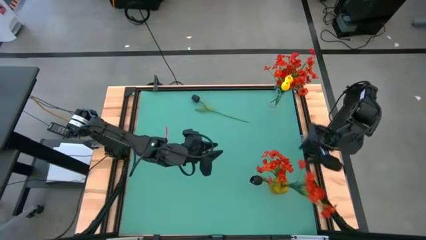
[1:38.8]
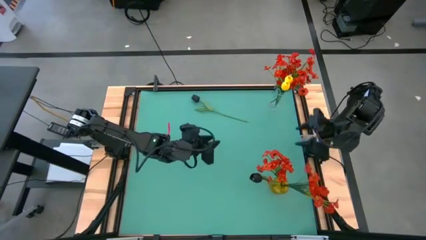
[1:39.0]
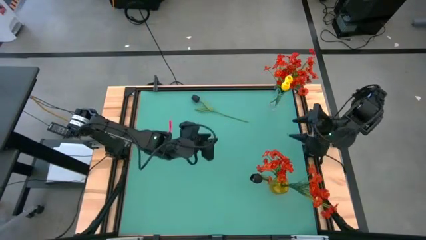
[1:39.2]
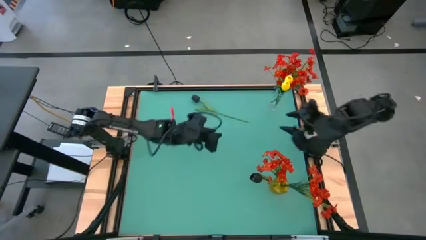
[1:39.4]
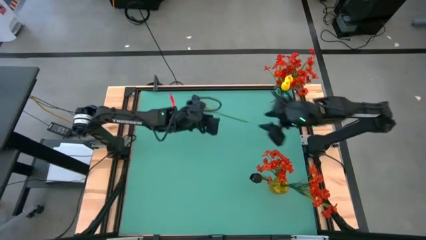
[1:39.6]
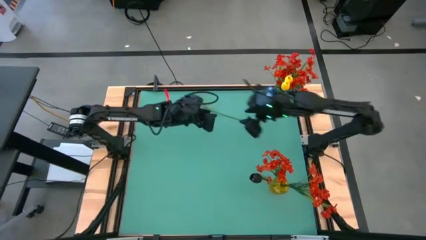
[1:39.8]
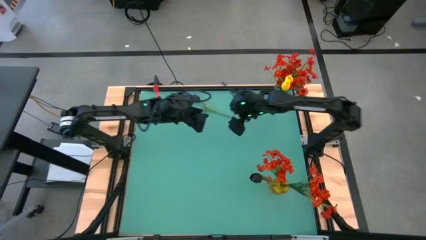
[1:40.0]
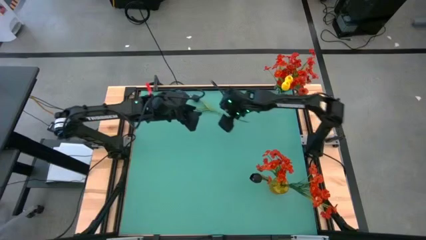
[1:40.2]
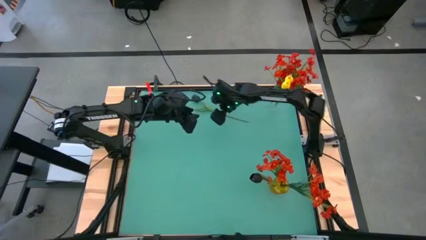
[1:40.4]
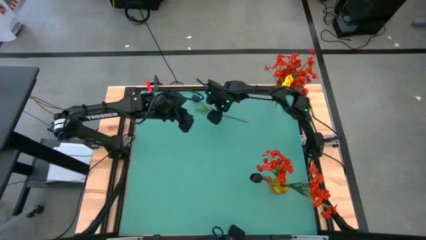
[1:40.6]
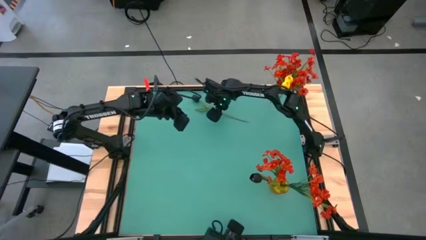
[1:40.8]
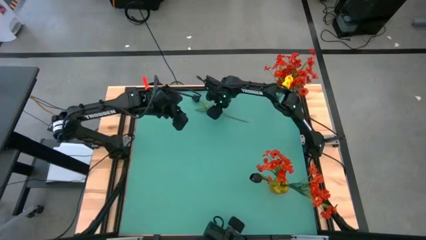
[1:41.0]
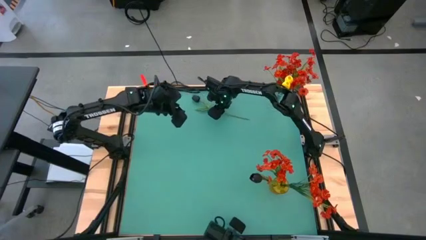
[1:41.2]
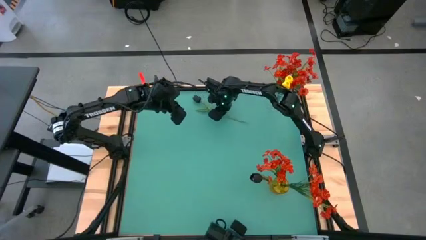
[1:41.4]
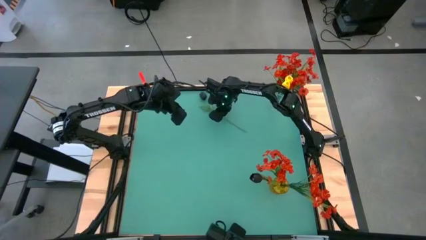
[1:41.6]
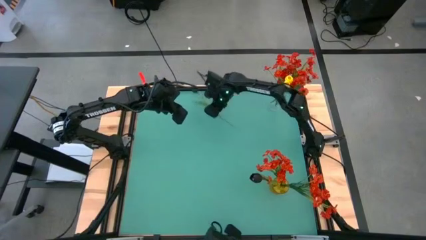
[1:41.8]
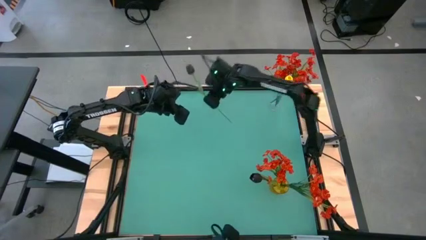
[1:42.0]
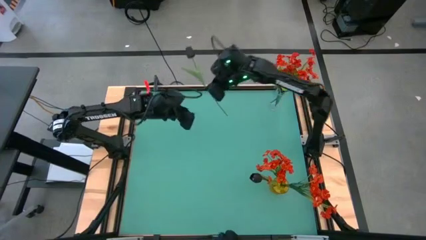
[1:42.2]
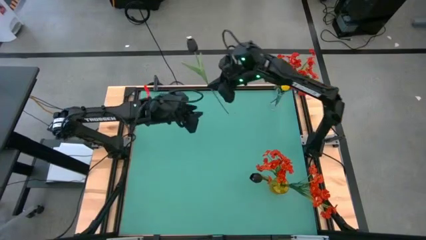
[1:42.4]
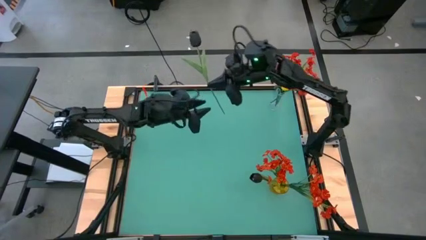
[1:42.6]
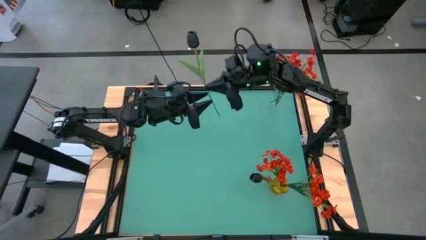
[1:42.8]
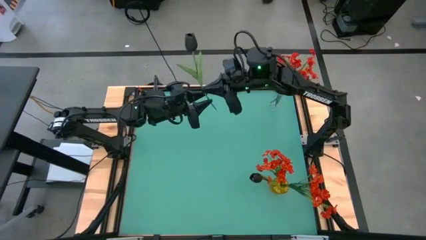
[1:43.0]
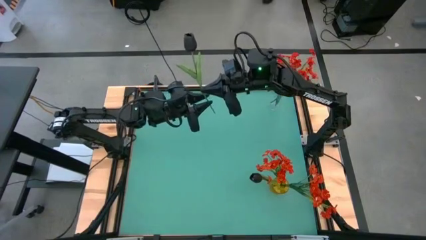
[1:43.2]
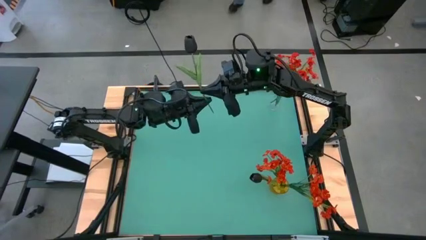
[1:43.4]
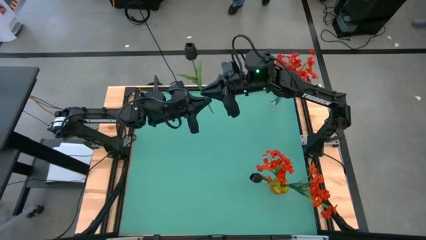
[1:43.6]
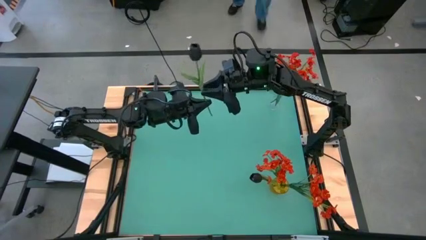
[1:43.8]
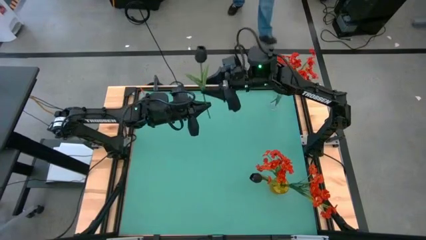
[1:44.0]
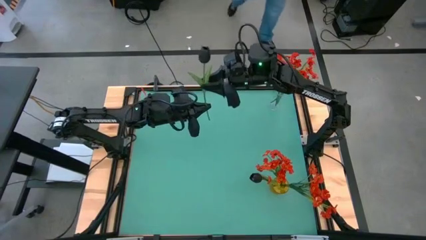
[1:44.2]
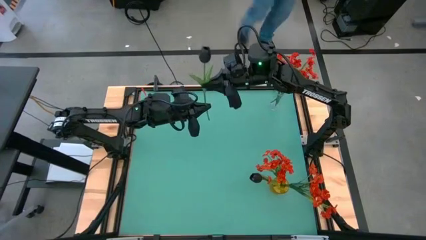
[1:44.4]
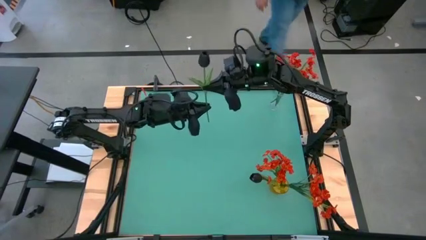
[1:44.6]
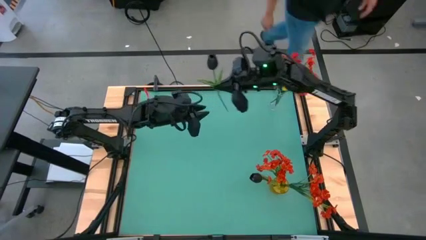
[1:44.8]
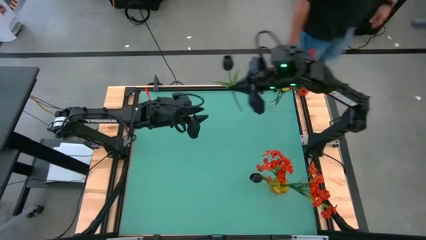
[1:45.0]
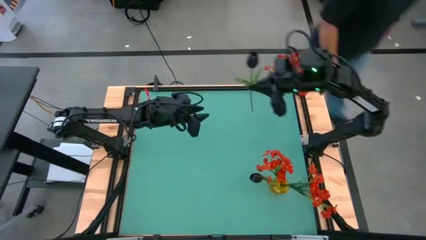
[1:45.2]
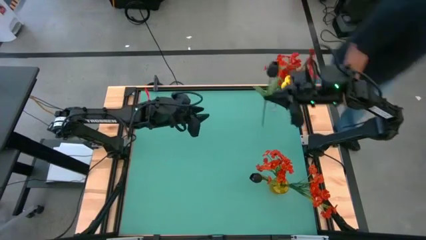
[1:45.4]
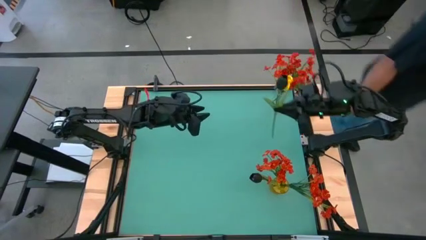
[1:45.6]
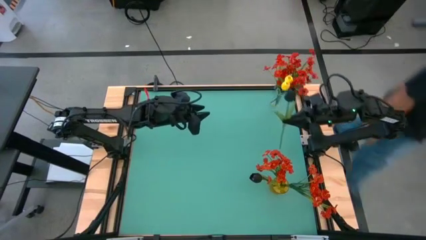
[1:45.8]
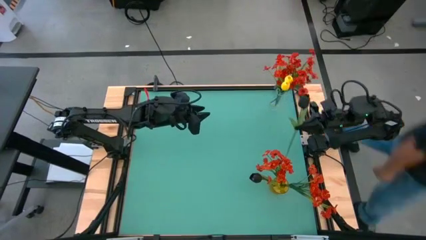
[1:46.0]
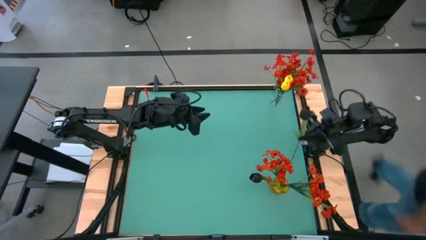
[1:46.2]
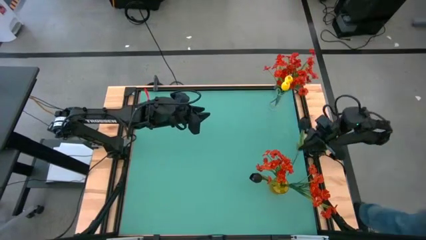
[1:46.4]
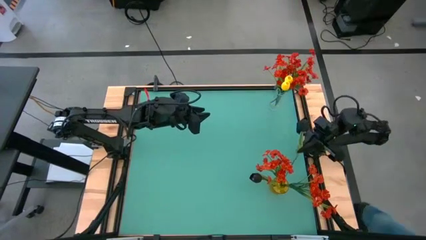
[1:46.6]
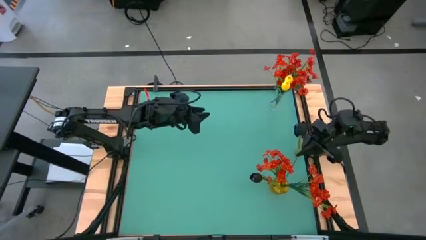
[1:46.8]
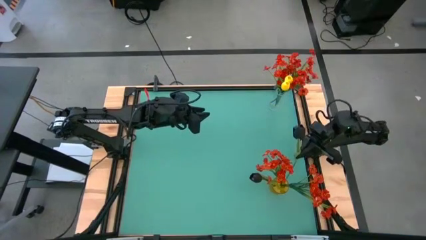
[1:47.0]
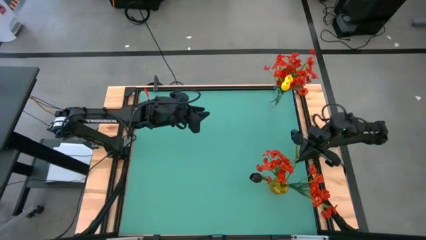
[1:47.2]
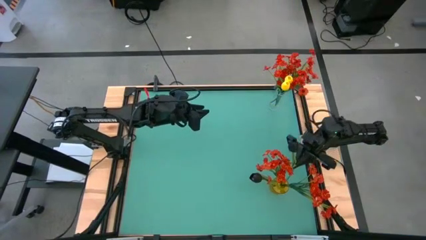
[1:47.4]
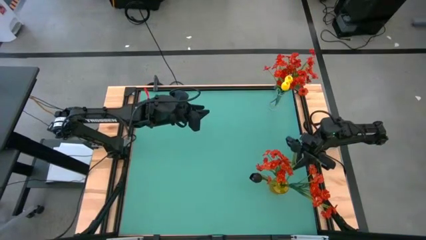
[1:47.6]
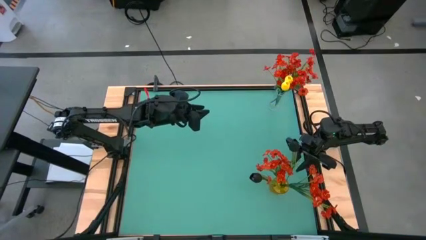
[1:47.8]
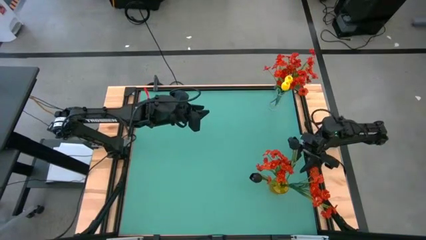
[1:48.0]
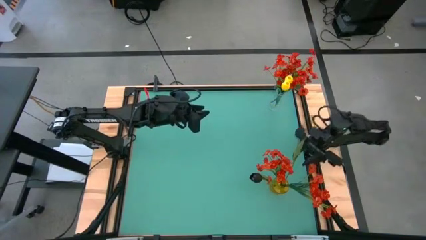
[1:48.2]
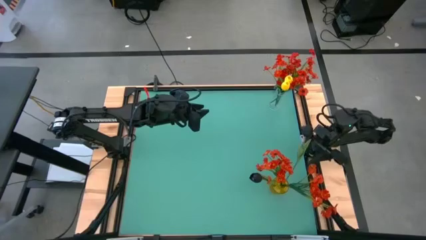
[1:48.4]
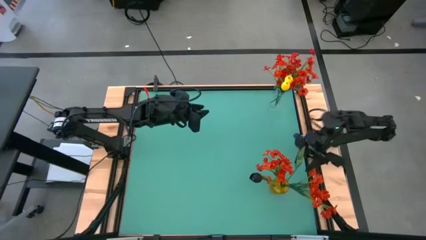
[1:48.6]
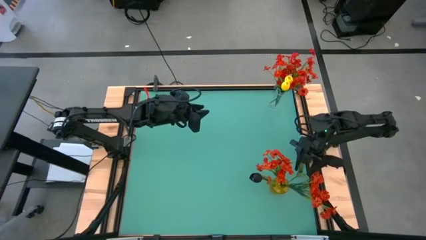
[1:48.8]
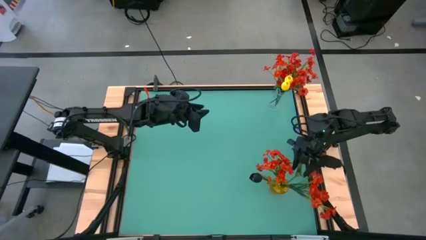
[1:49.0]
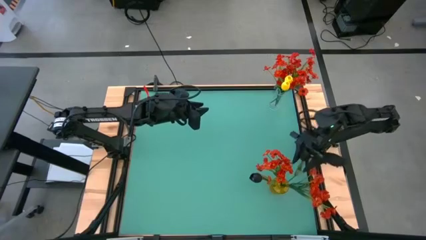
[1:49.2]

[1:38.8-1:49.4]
Task: Sort flowers into vase by color
Put the black flower into the yellow vase

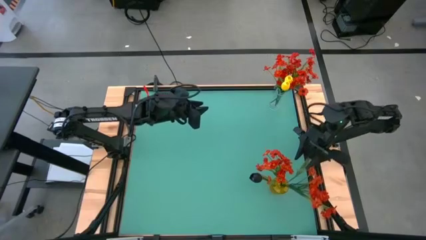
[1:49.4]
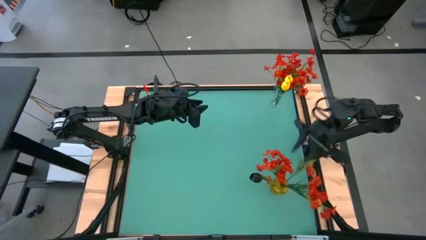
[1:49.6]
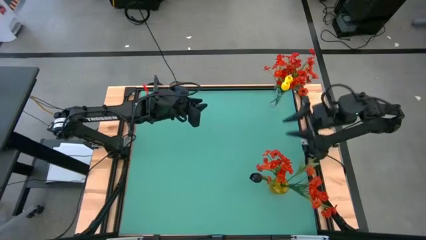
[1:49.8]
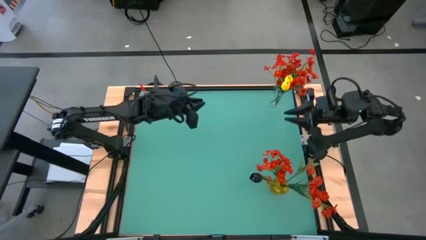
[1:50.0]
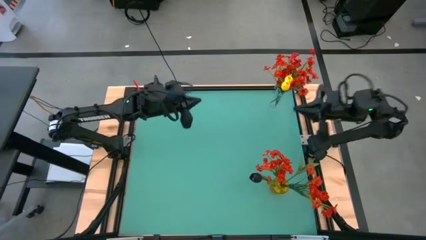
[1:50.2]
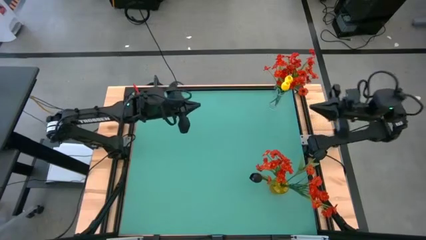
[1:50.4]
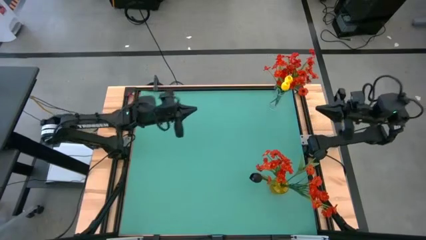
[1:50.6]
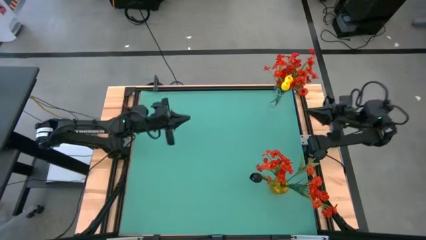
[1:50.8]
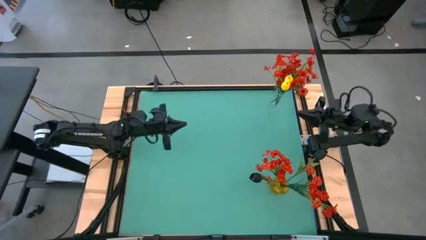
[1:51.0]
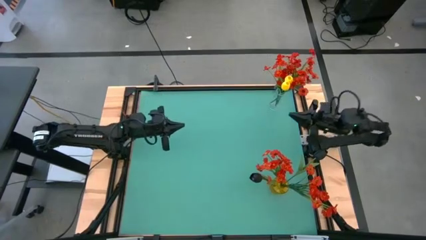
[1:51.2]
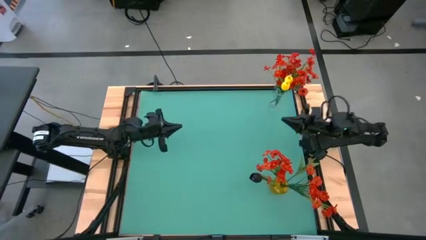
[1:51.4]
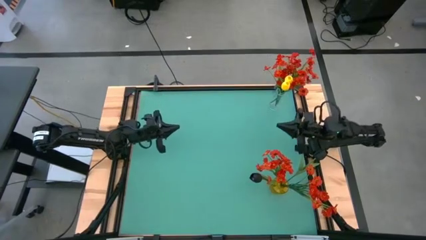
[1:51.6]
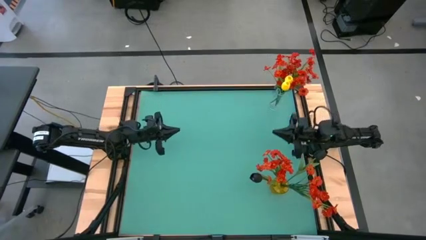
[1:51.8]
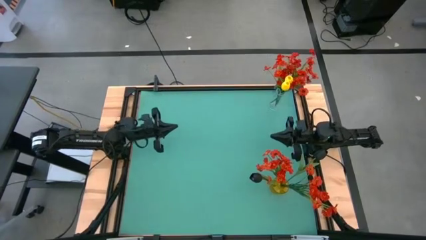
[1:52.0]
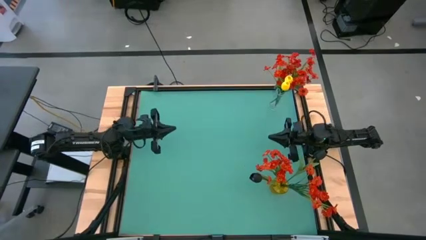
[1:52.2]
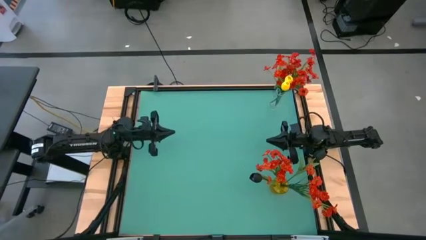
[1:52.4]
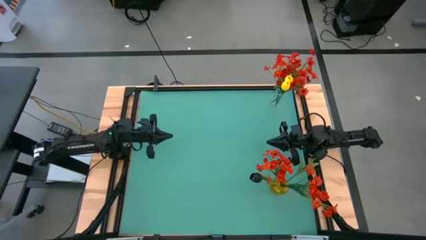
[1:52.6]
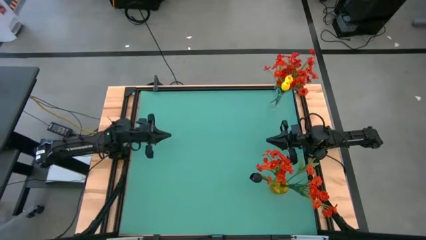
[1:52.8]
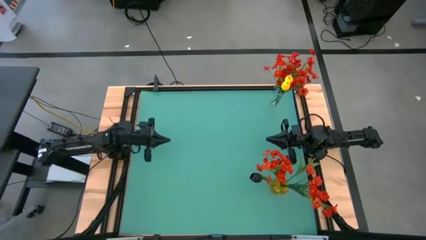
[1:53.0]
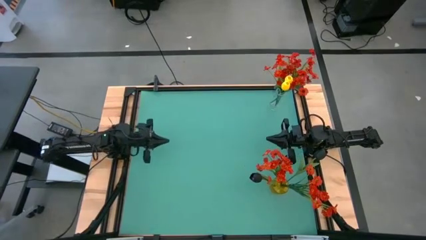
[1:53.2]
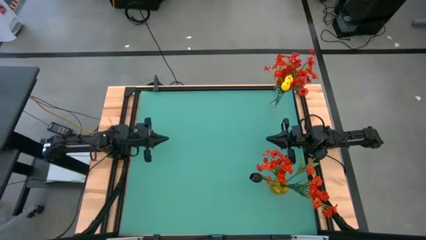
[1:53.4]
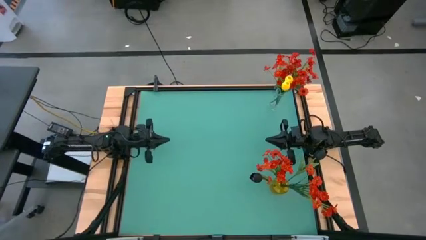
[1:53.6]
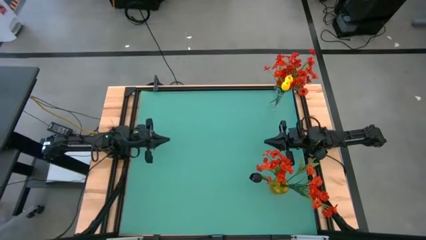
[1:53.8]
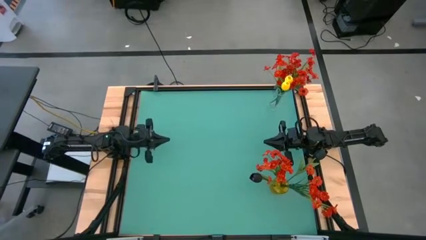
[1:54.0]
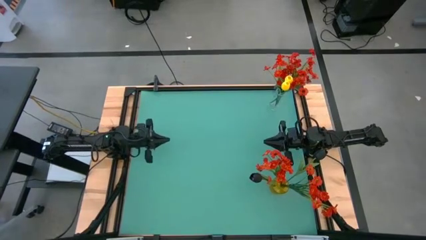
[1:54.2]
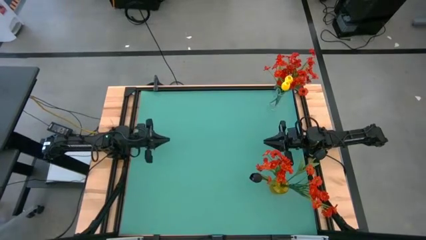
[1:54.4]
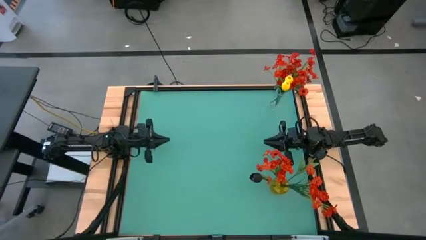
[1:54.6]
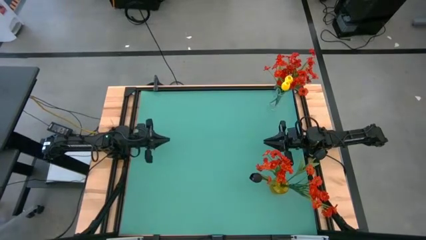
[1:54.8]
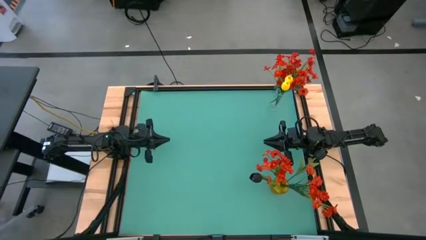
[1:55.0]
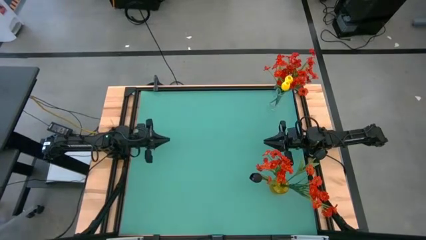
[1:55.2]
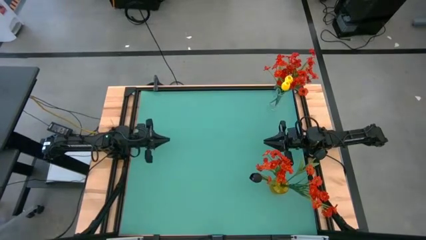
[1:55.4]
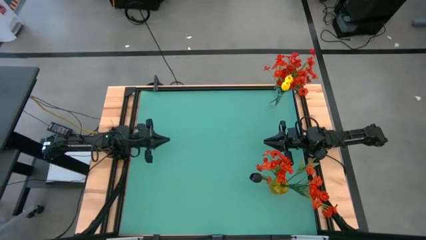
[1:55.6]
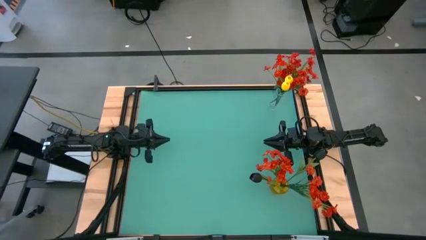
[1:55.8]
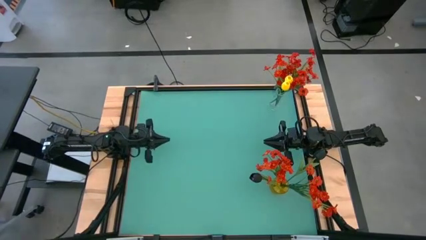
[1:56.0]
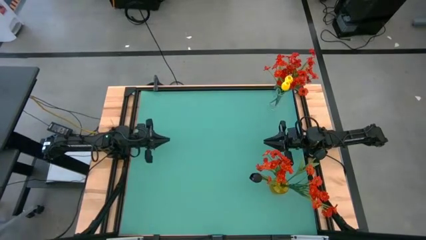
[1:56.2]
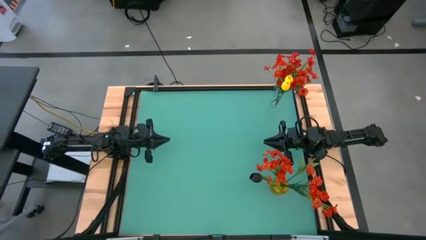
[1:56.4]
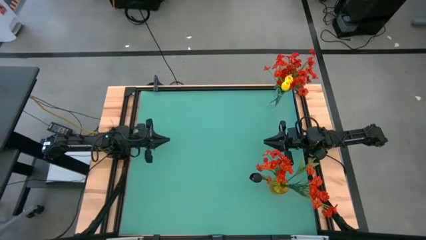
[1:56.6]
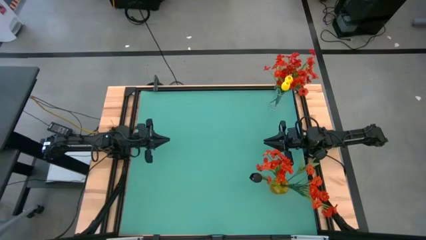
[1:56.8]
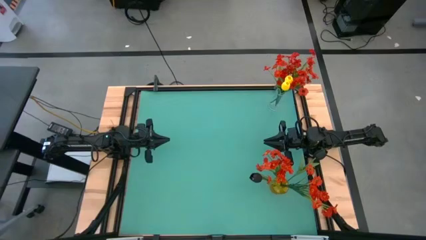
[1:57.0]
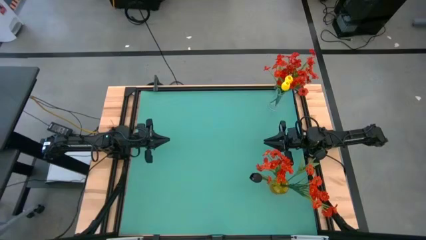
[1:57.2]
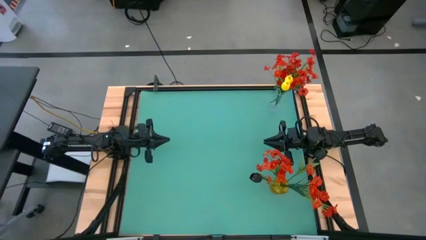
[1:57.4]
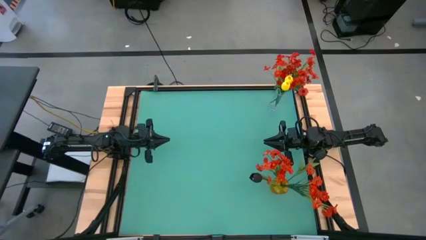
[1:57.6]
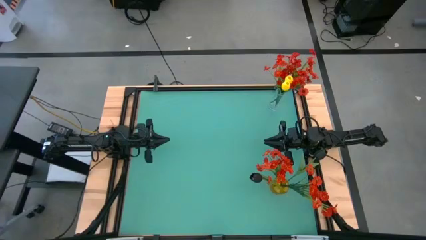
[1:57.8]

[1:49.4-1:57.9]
Return to Home Position
